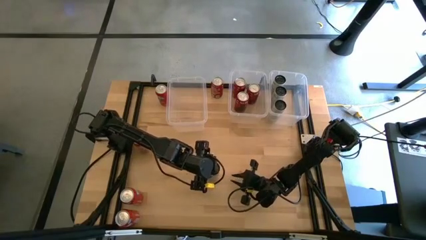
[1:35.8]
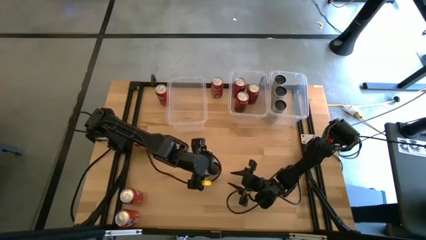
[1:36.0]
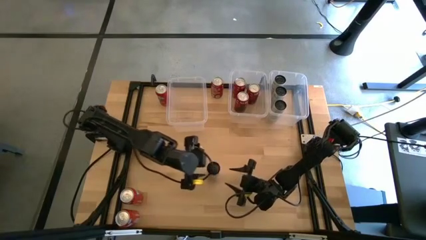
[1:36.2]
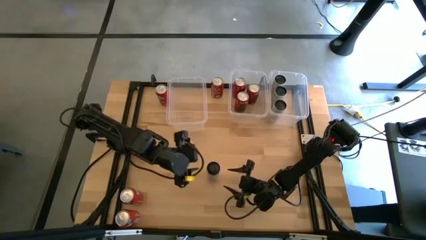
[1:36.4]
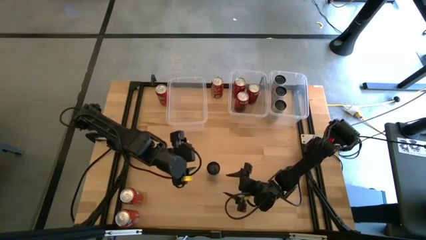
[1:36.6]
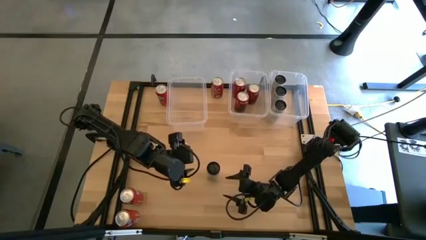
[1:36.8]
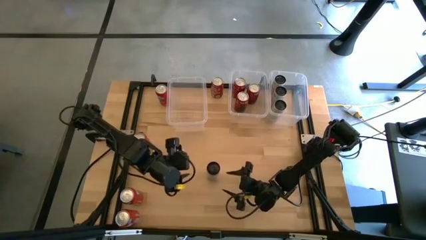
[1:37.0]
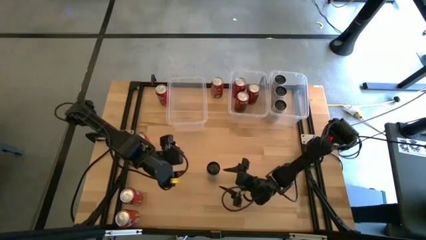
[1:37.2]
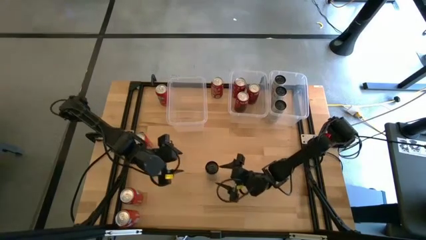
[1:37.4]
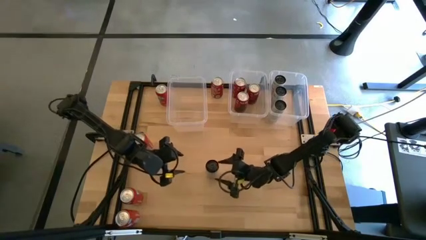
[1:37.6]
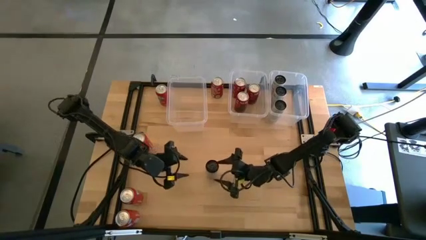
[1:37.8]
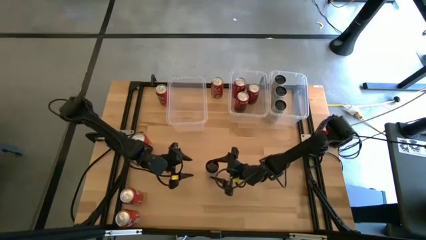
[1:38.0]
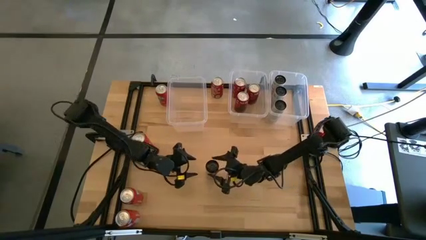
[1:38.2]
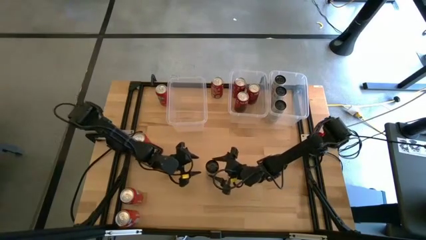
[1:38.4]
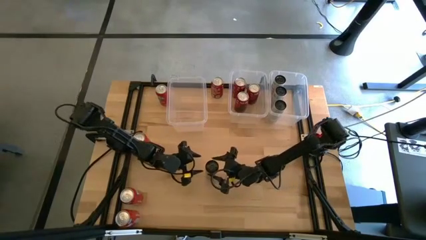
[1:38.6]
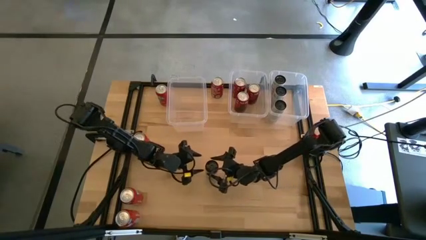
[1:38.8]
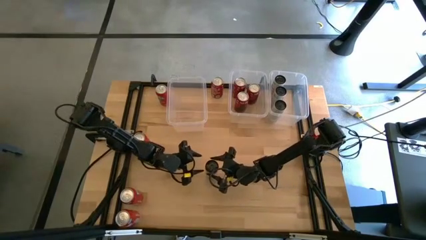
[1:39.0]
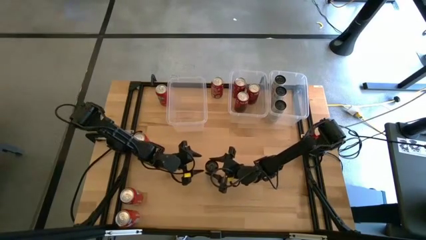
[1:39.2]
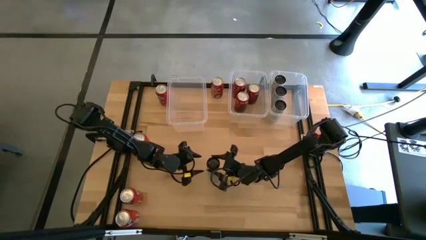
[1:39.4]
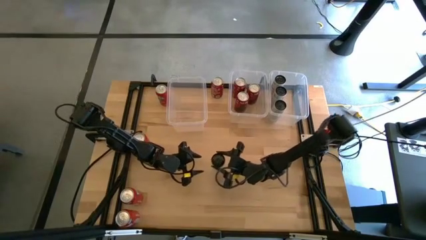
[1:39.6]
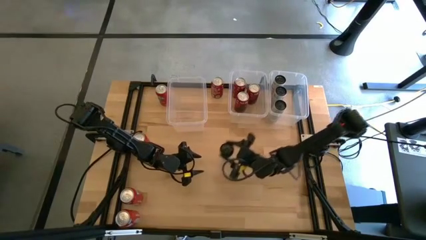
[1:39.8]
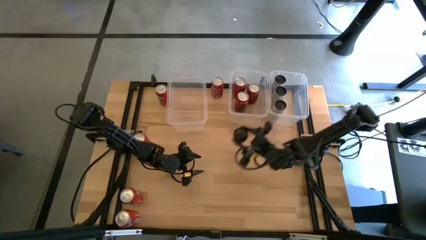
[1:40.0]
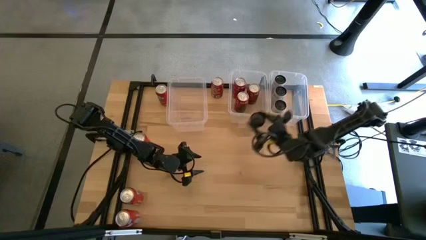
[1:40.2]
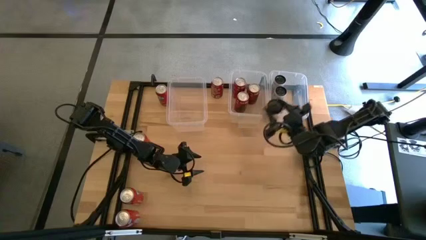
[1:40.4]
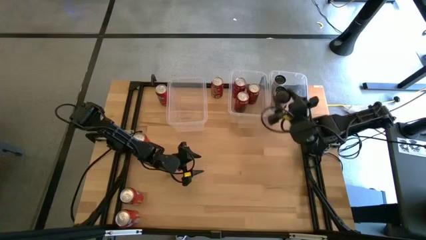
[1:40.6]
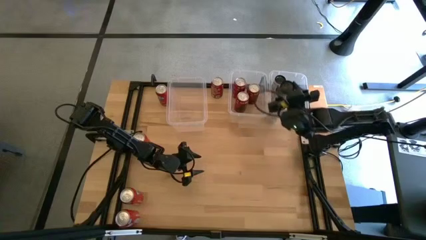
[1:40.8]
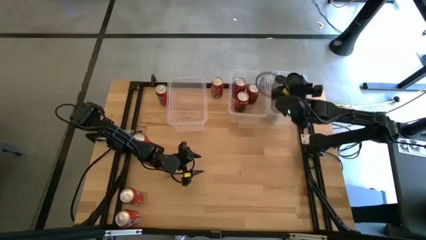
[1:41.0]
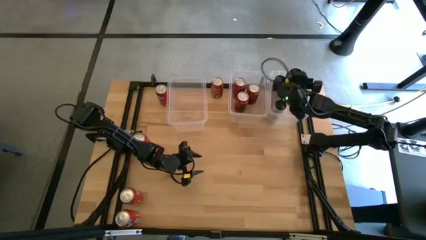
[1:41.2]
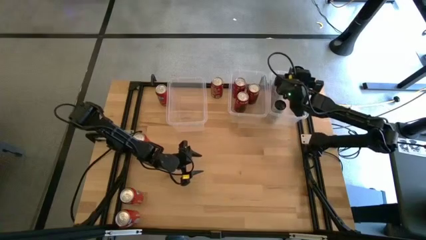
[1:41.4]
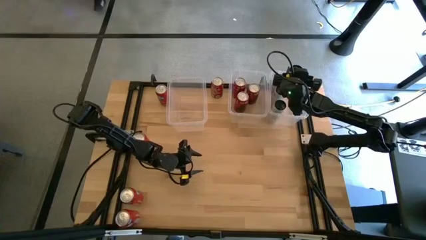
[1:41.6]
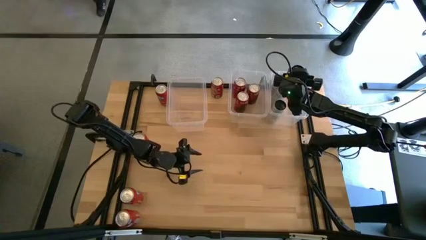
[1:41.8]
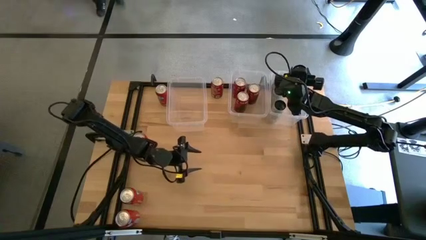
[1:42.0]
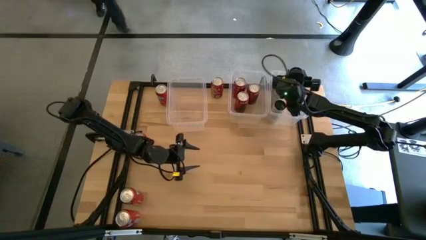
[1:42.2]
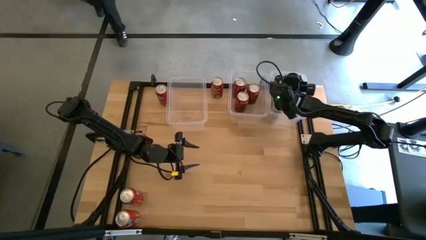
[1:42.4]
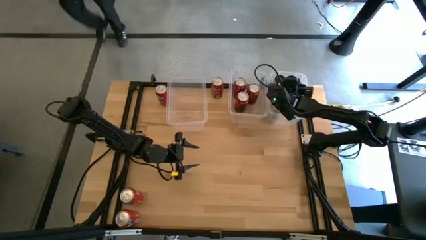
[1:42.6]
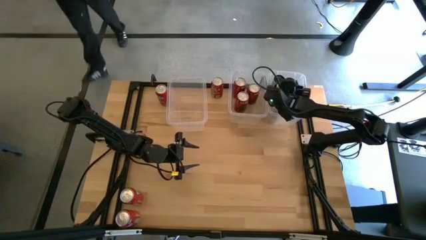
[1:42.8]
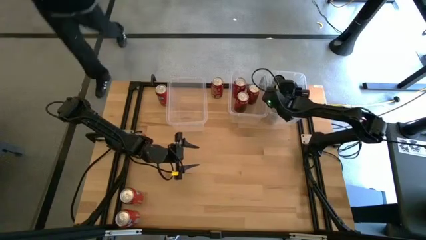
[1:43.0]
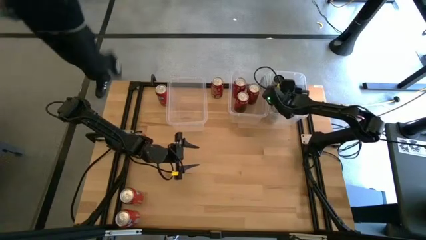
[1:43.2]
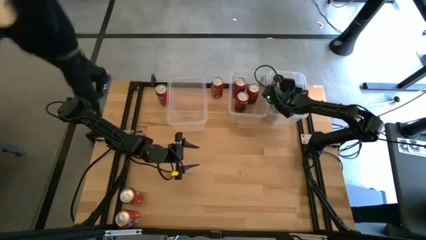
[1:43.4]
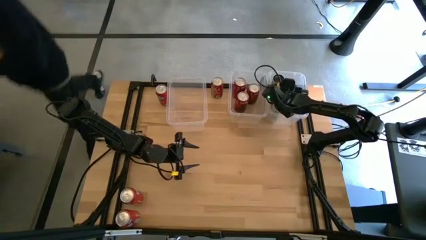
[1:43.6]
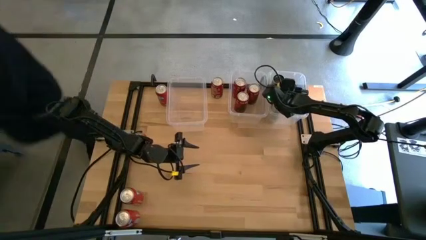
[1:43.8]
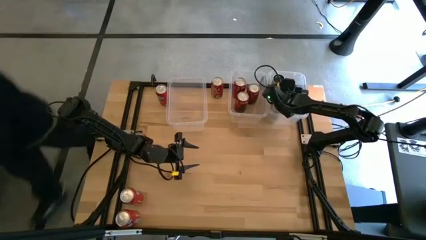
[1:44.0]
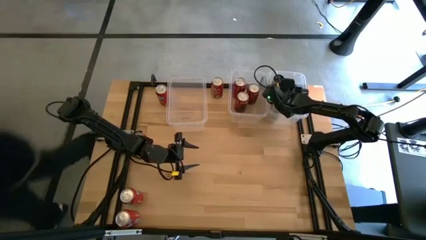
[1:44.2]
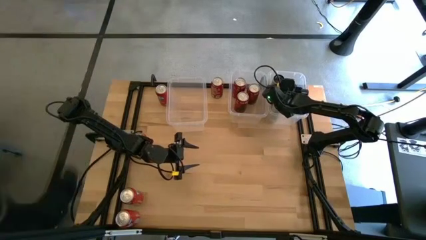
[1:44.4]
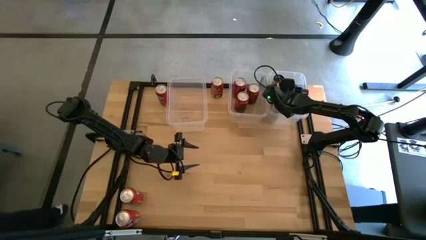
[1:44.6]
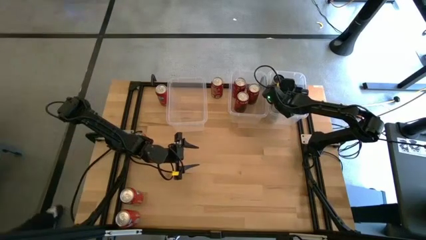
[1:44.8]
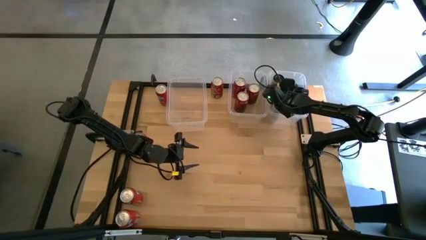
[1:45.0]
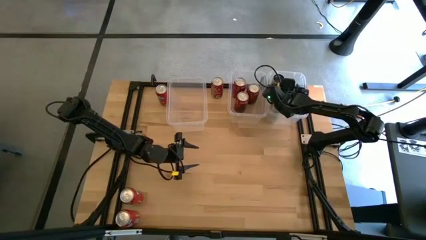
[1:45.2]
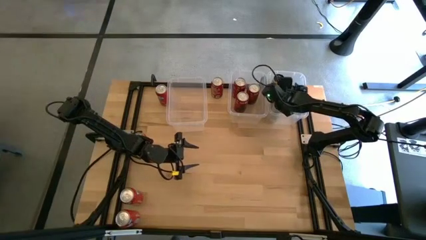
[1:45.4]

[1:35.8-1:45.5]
Task: Sort soda cans
Put the white and yellow soda can into the right transparent bin

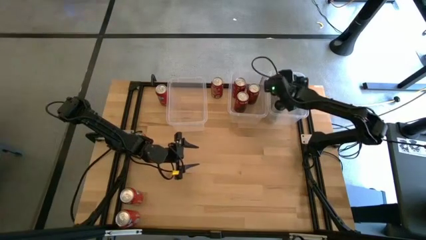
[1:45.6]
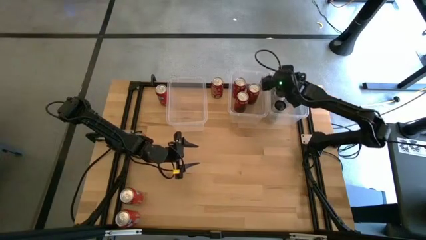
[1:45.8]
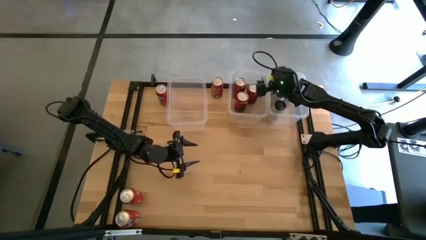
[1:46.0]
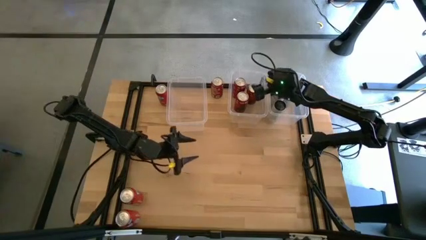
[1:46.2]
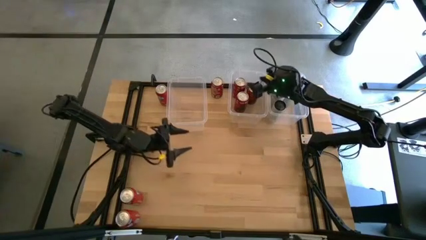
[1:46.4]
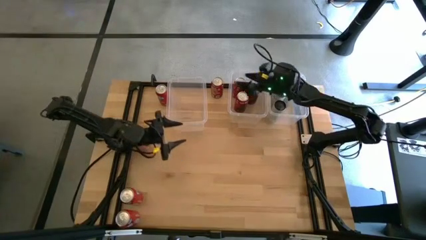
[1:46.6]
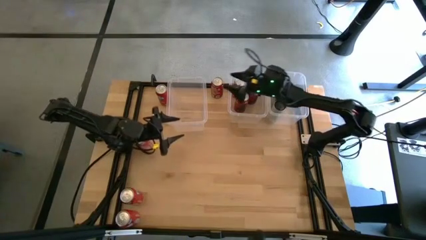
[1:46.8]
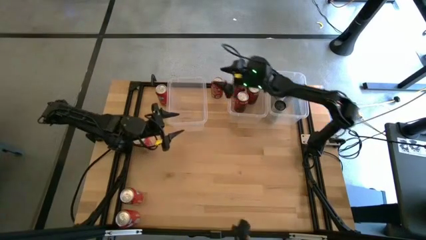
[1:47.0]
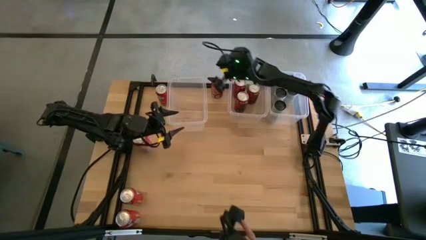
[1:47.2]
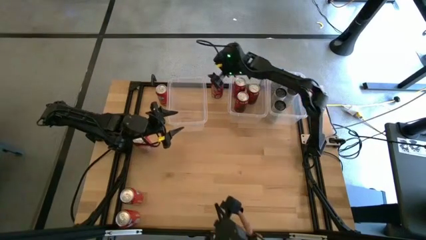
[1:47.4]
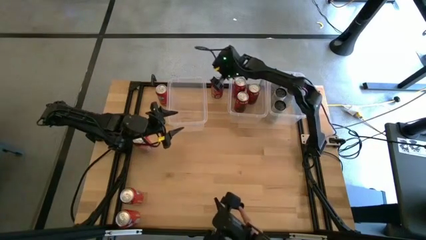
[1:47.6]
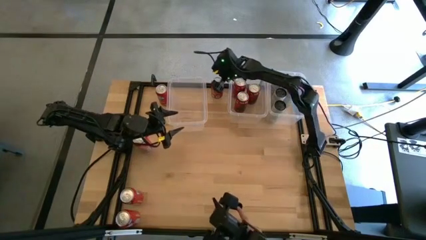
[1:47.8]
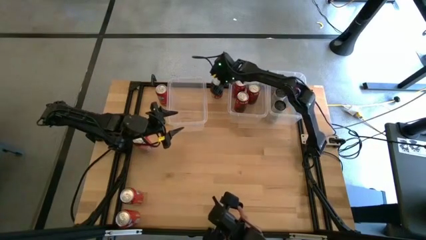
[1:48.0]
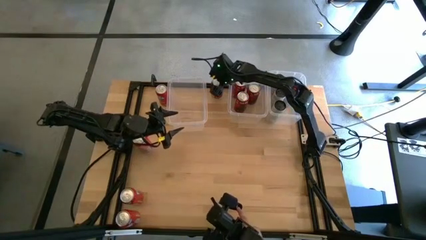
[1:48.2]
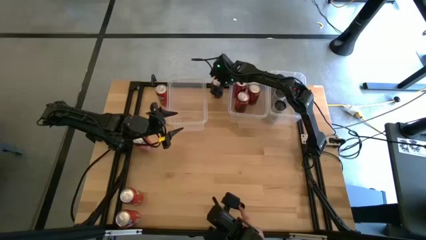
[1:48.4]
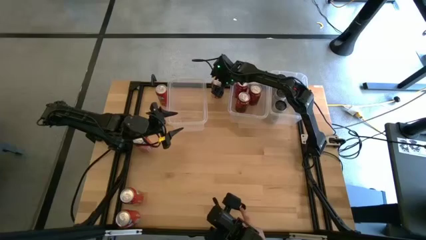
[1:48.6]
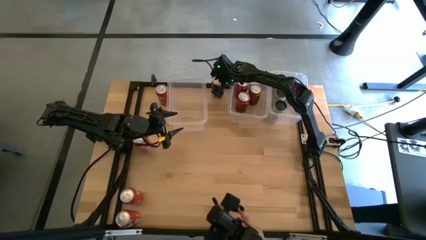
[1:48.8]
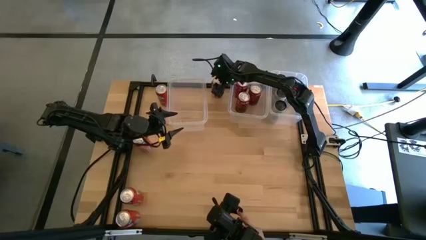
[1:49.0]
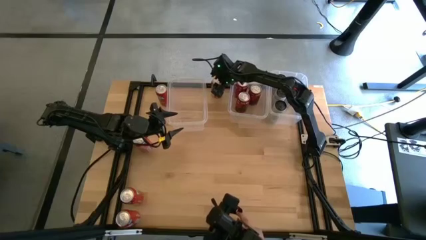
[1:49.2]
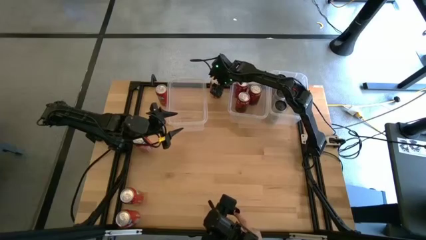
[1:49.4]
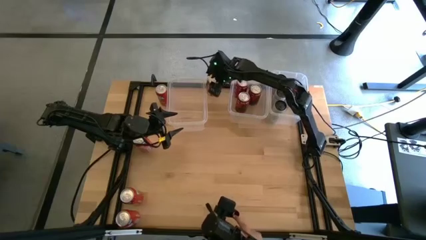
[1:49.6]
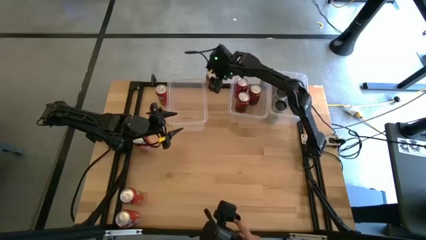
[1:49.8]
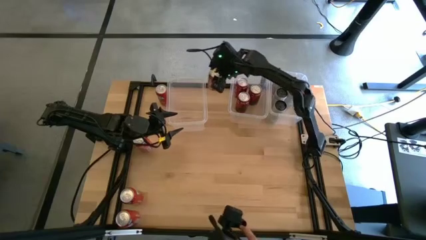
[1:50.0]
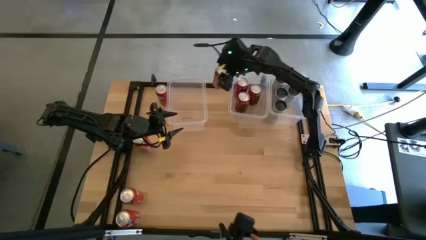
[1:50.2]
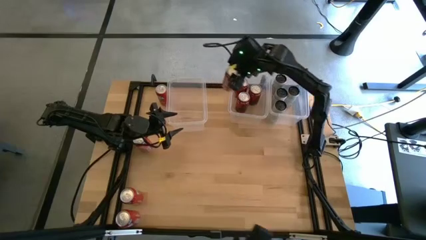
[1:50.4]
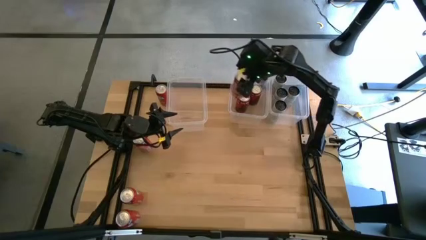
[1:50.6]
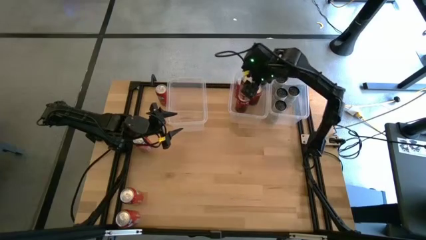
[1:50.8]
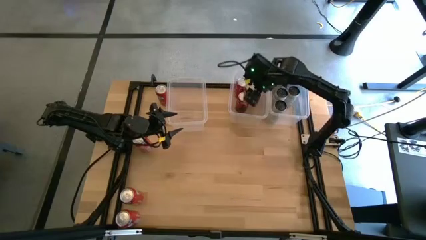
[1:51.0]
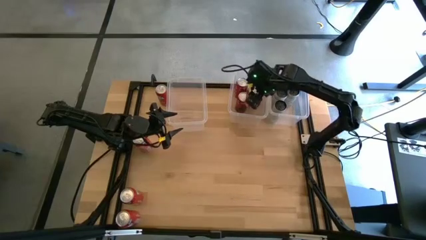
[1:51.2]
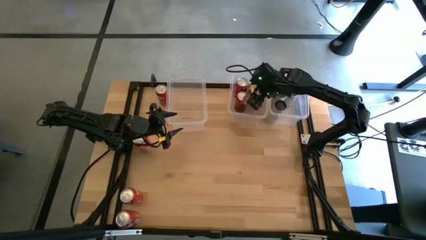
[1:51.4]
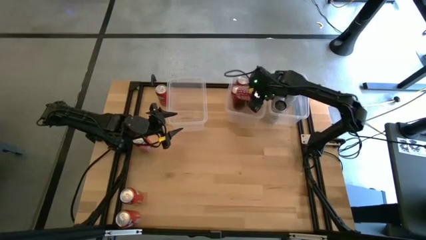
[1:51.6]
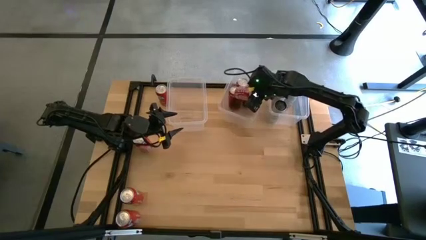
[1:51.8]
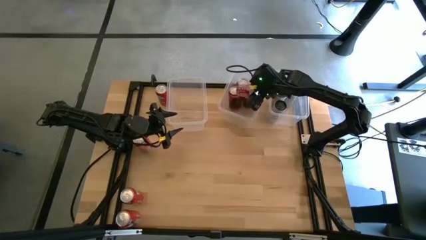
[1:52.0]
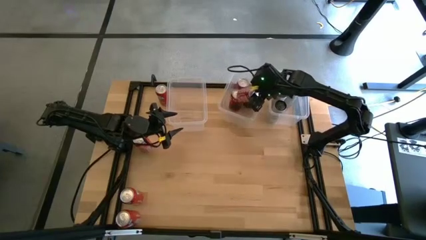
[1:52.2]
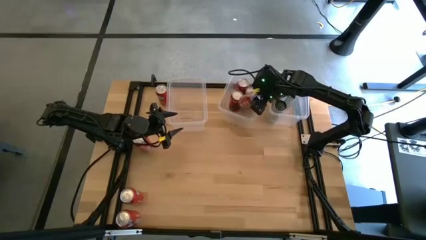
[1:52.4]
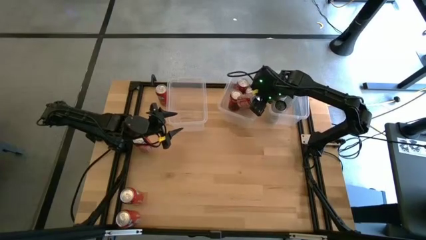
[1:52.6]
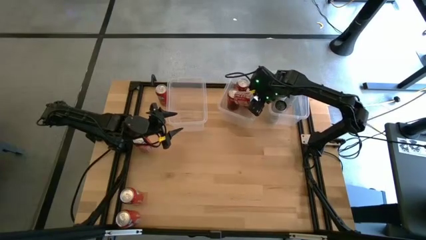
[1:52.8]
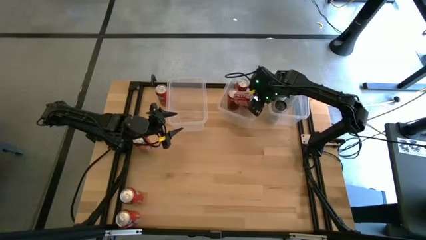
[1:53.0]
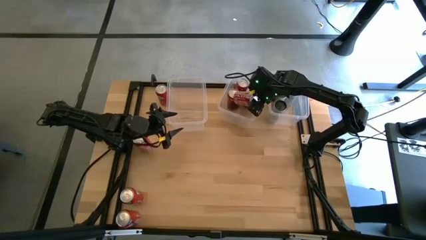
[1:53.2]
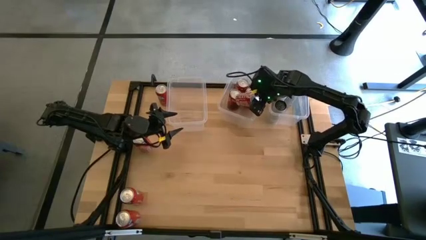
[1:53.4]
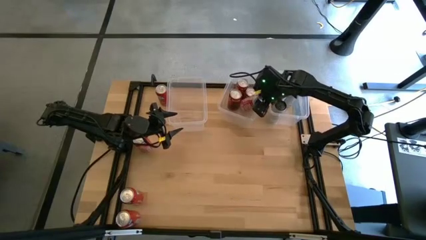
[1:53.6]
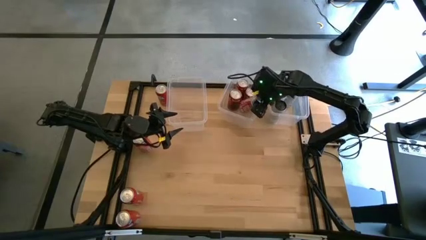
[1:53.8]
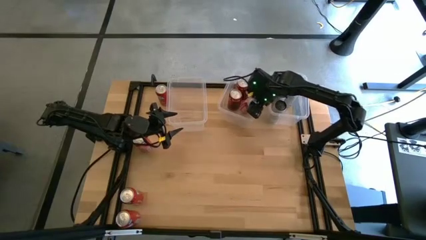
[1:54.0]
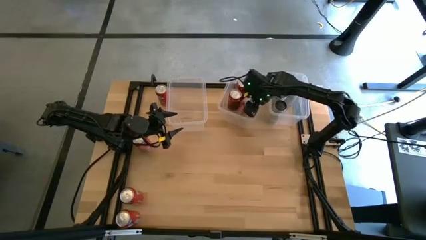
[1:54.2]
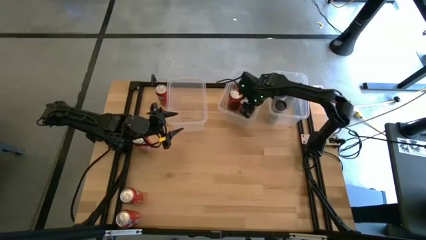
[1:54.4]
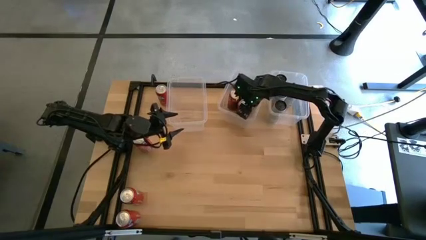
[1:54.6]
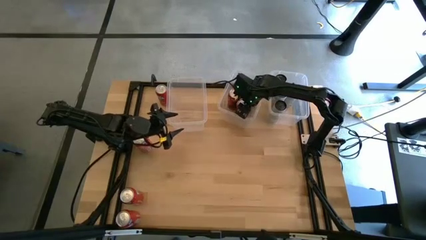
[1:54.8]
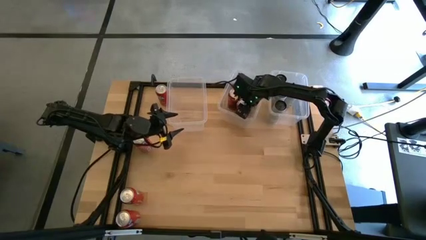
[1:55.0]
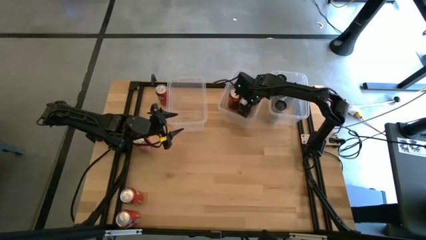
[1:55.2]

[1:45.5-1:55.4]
Put the red soda can into the center transparent bin
